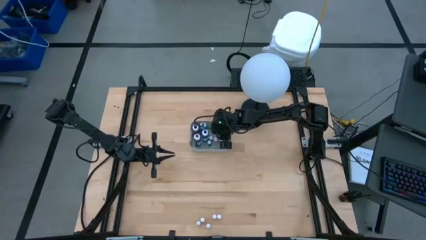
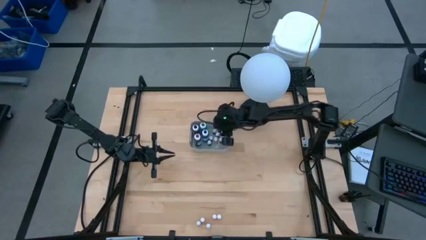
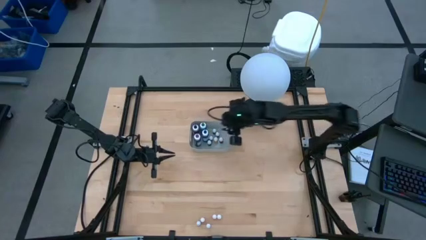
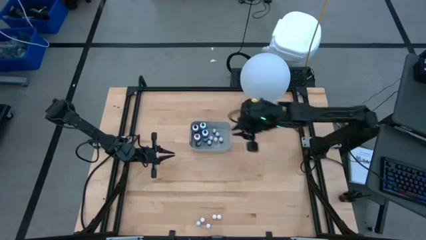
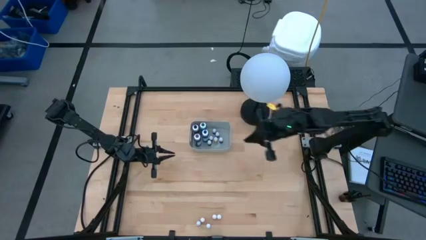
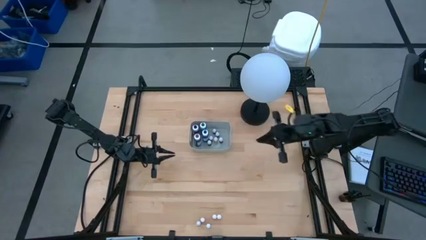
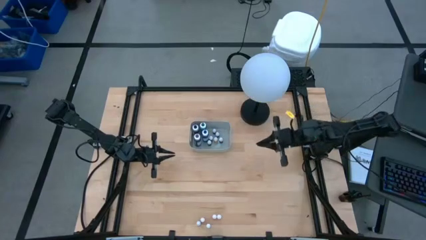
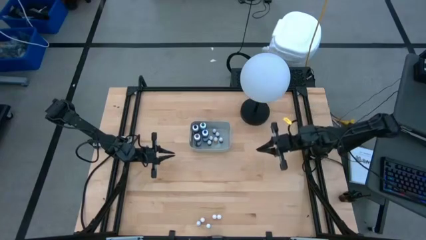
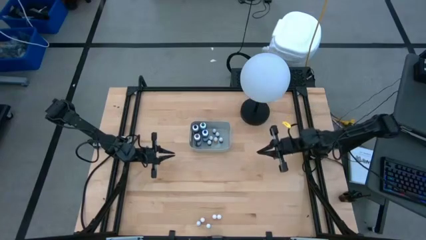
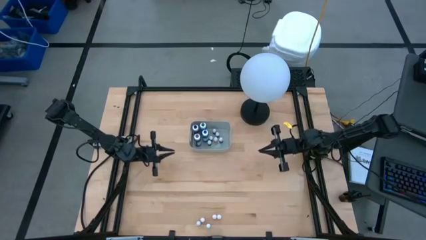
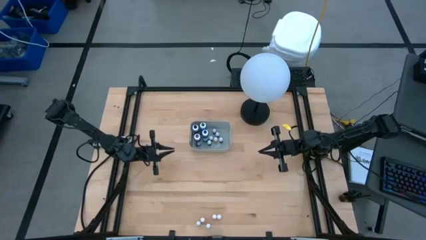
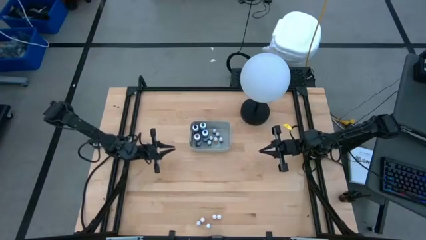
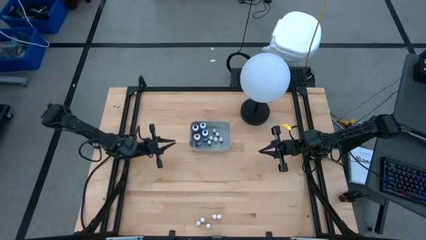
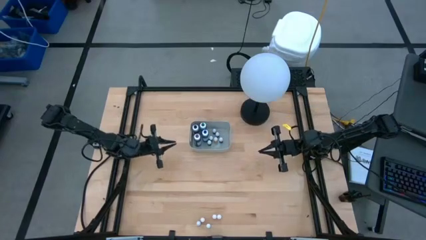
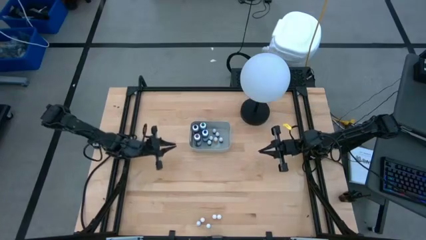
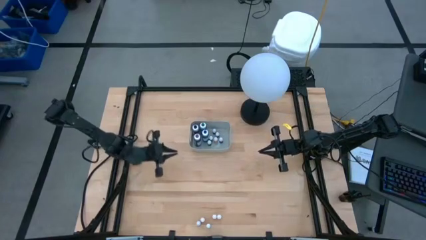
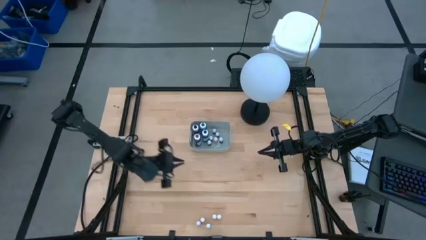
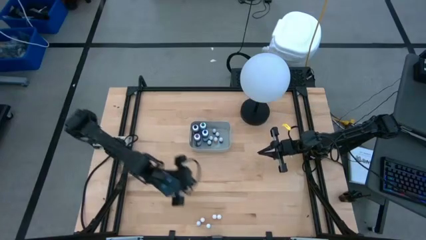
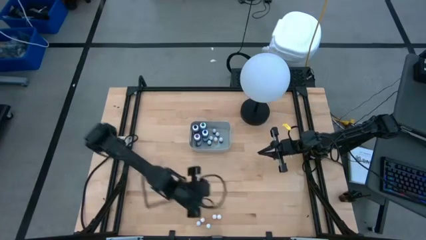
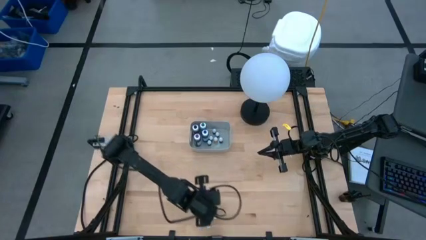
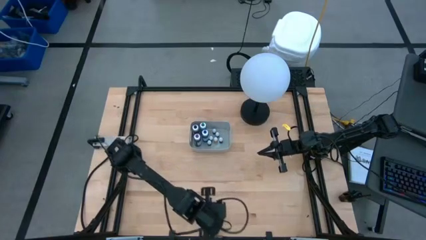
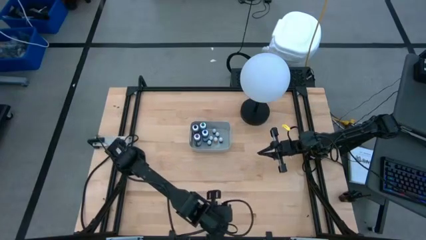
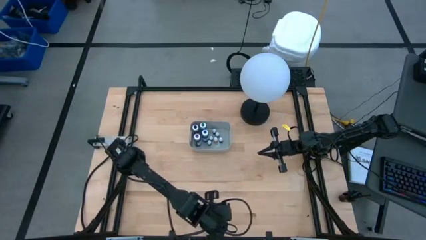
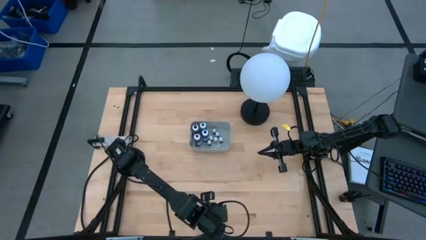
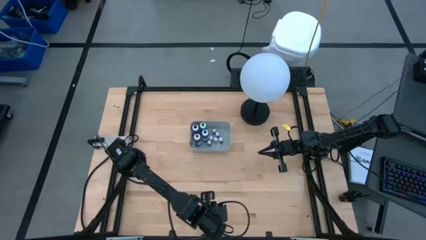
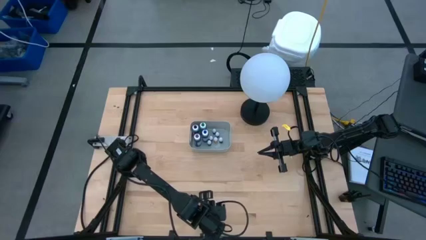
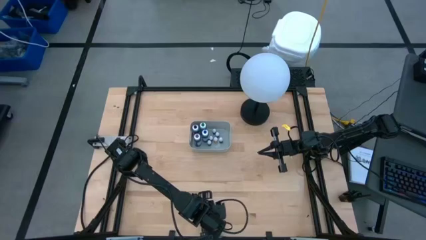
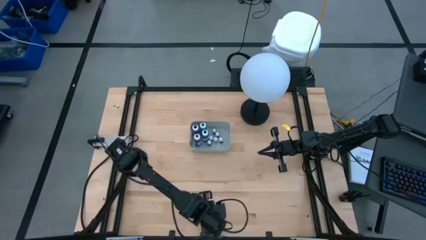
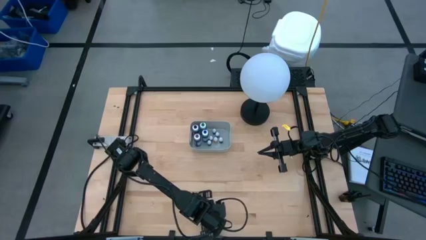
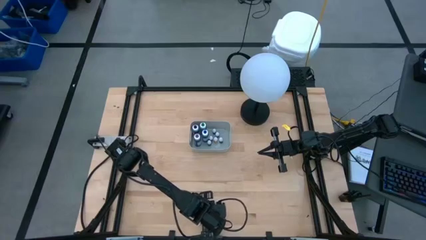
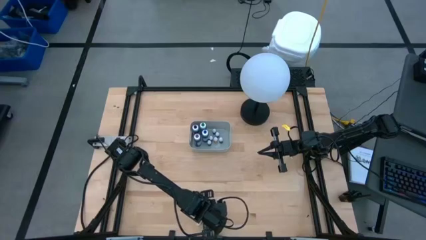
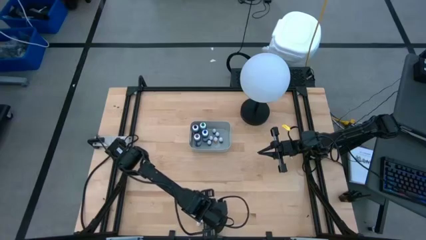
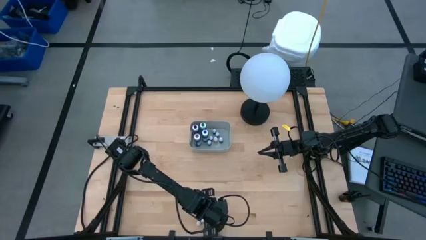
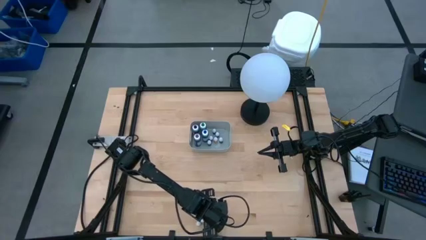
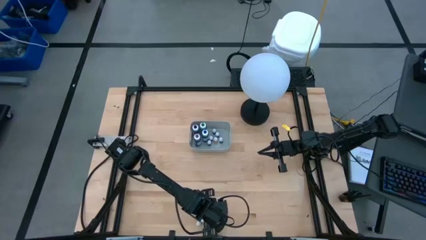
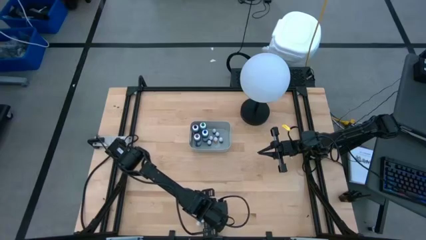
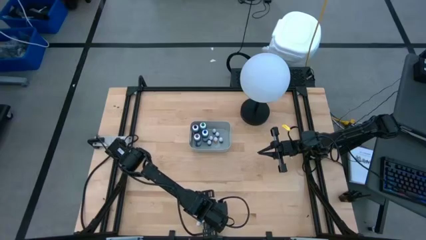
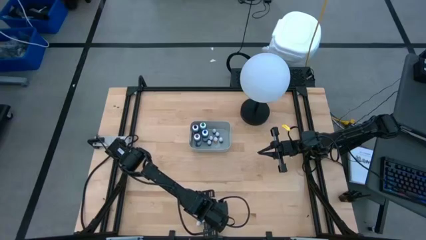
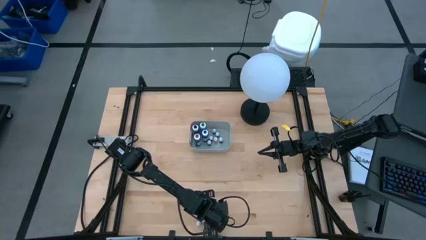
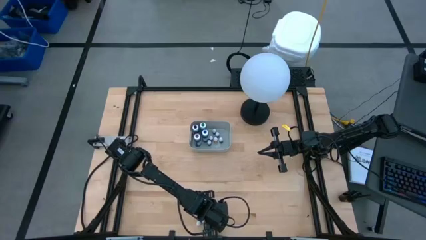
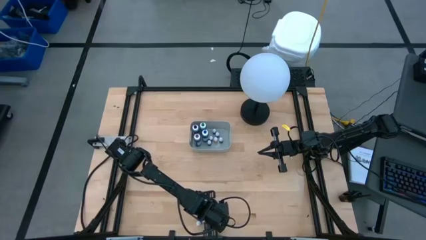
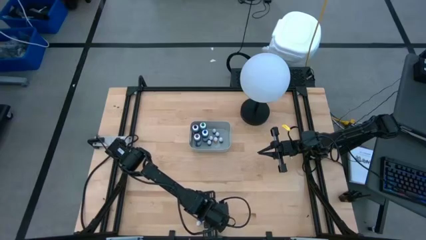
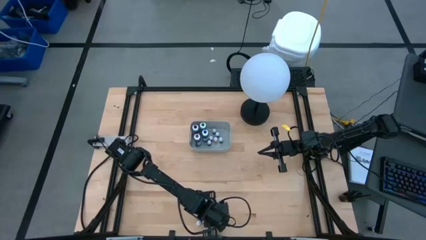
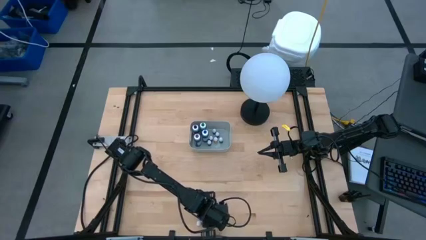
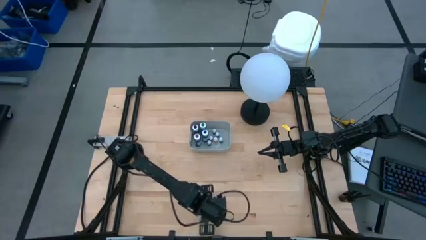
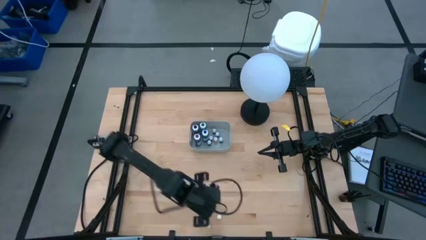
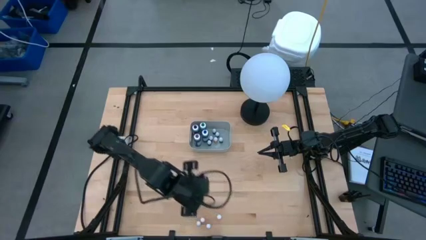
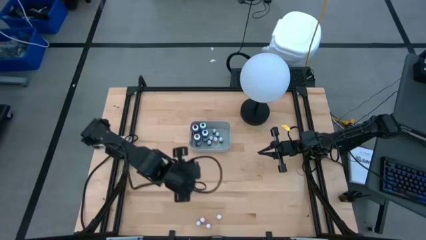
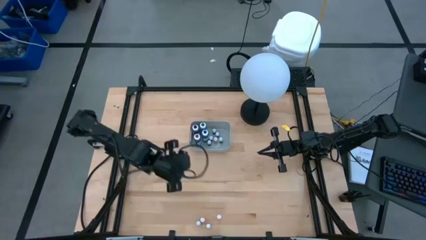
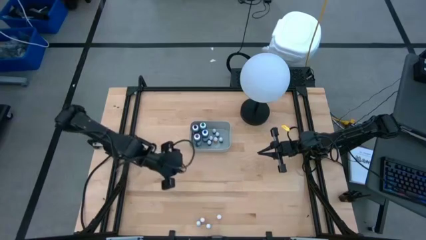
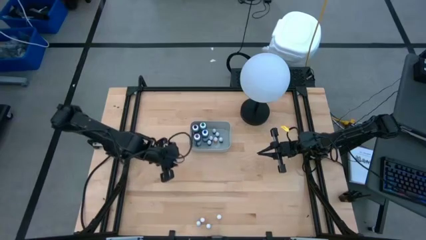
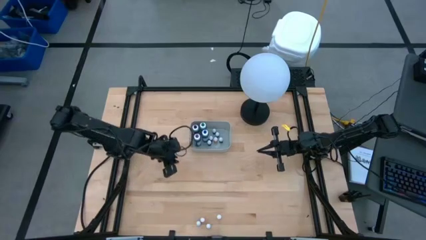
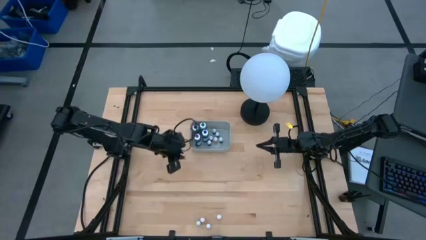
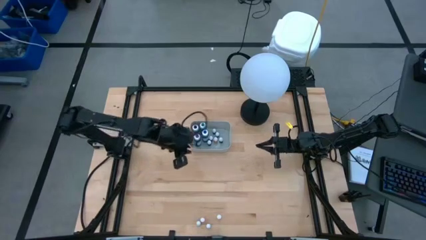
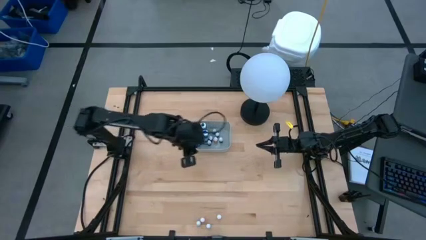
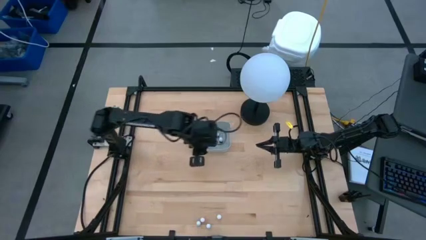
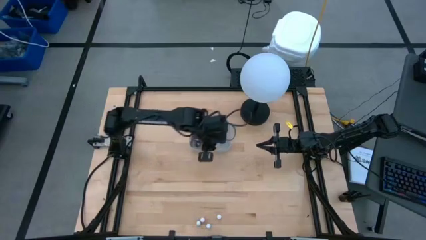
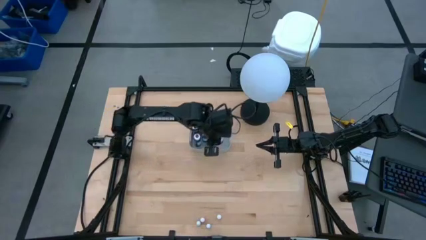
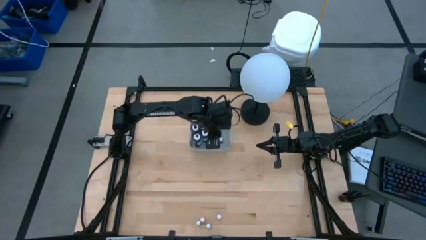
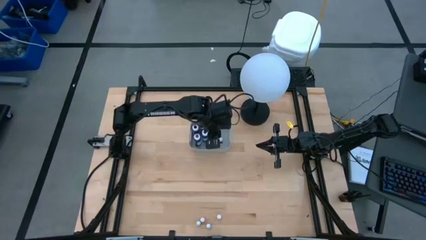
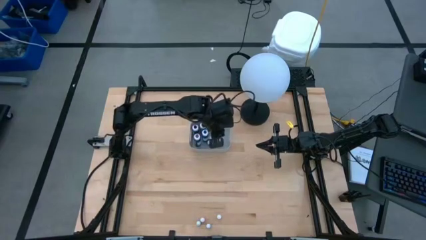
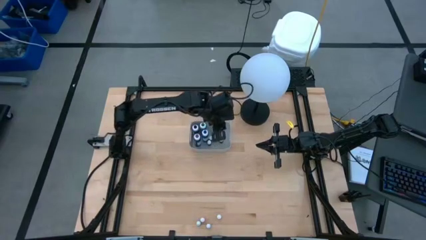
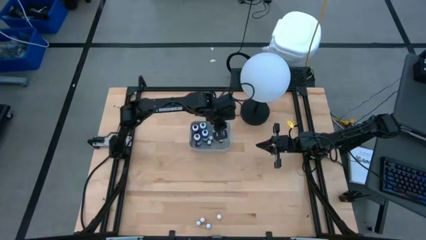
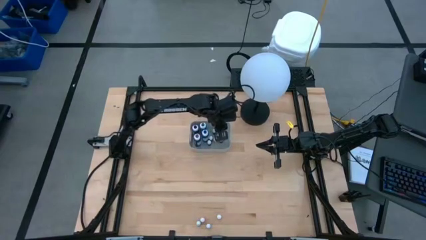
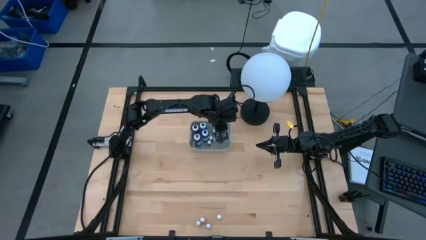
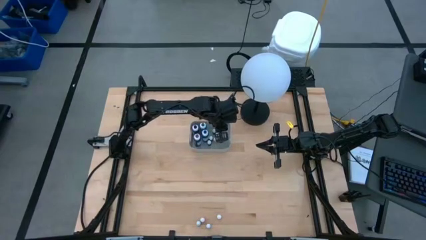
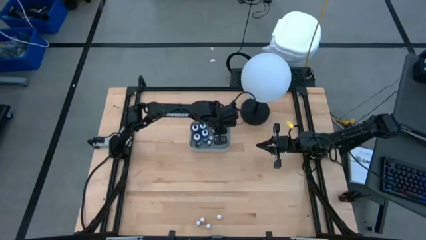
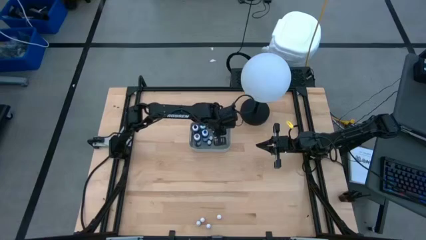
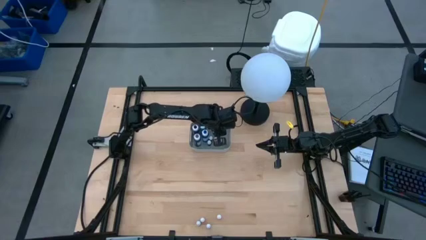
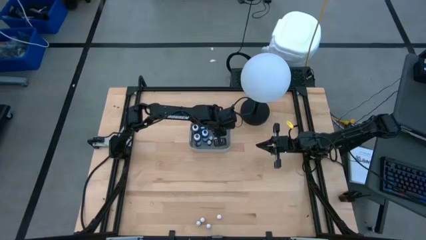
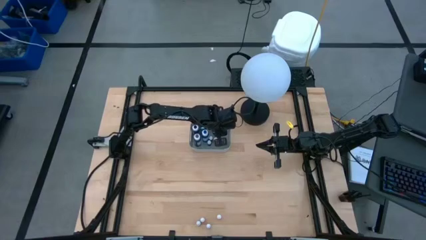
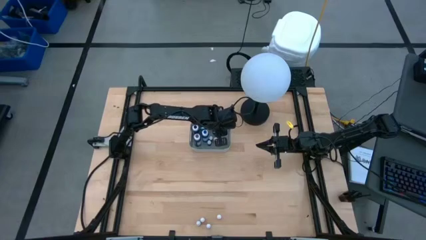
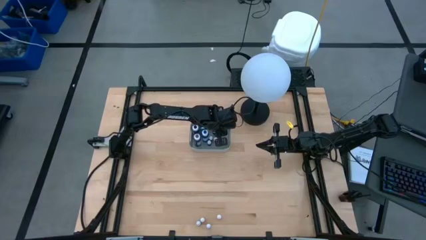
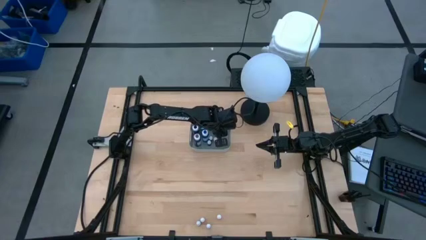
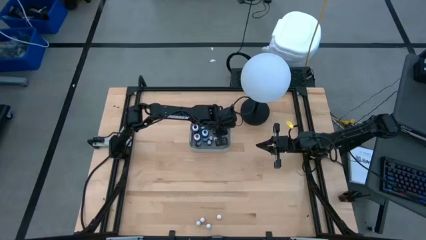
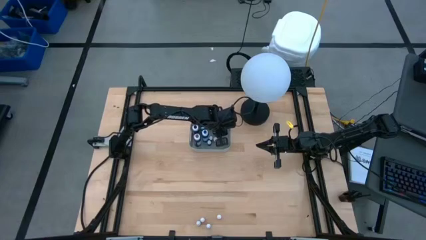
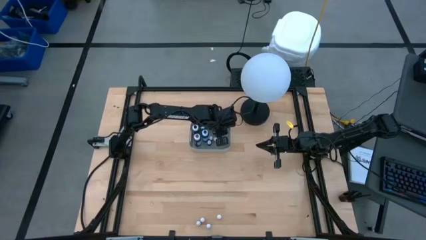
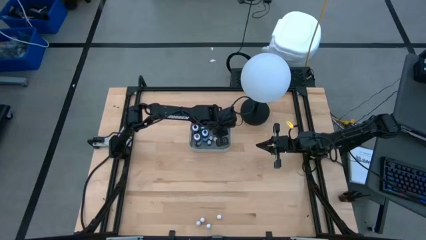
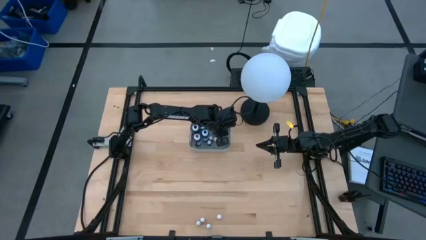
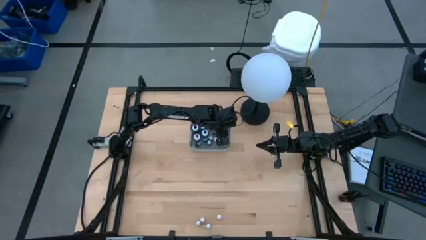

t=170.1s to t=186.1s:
Task: Pick & Place food coloring
Put the small yellow food coloring bottle into the gray bin
